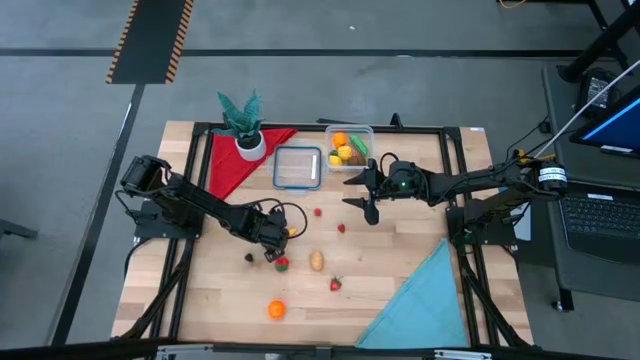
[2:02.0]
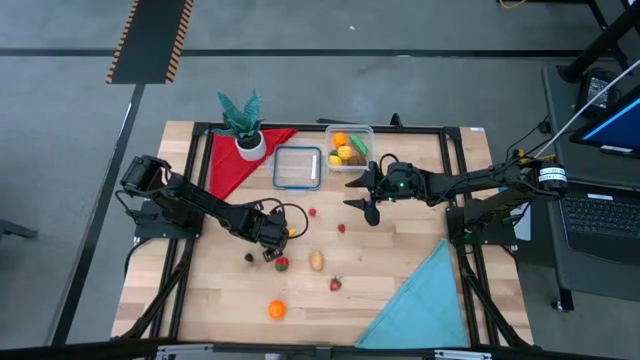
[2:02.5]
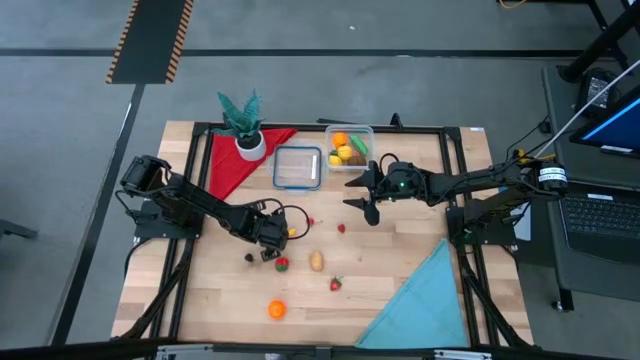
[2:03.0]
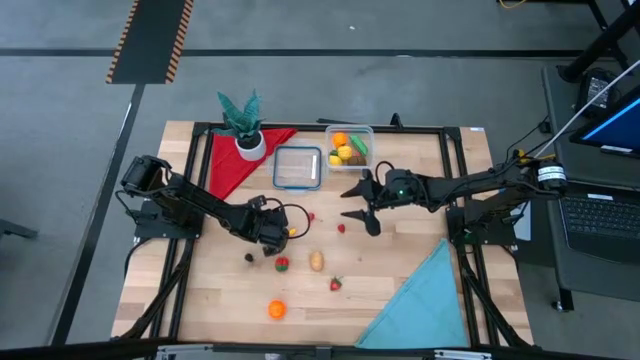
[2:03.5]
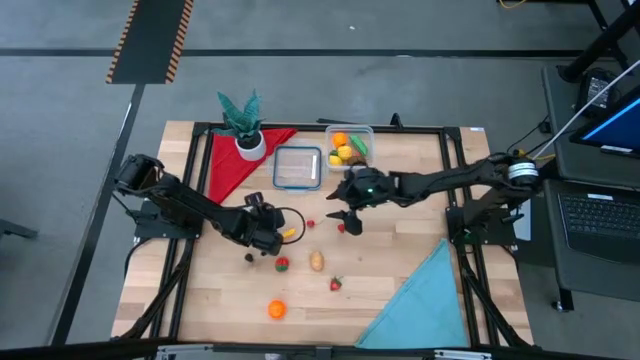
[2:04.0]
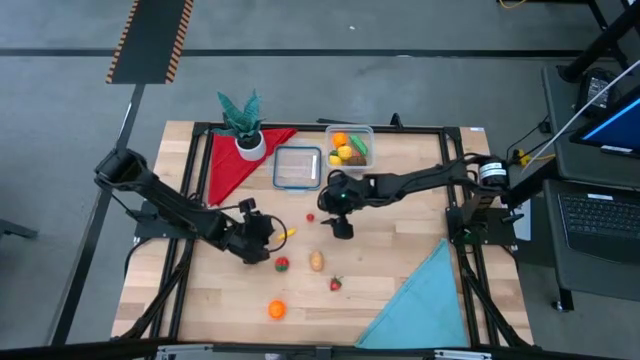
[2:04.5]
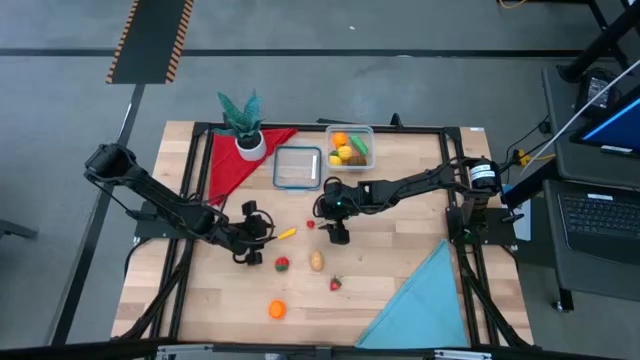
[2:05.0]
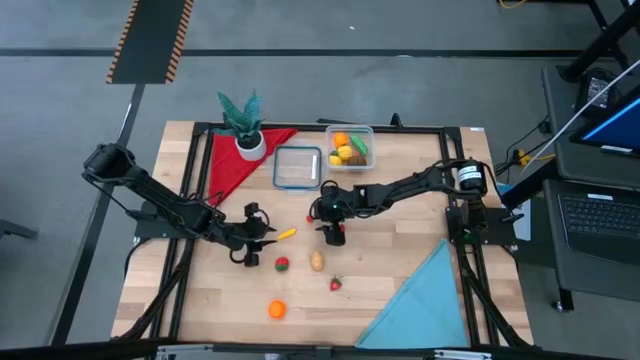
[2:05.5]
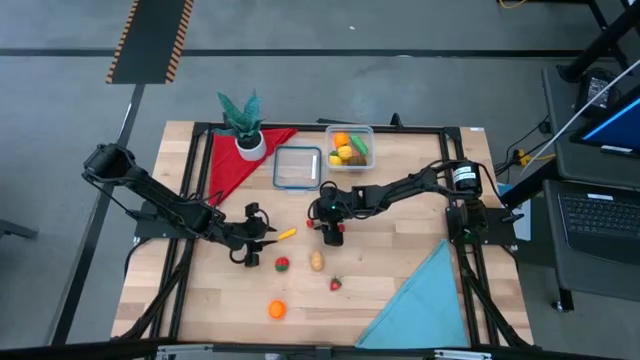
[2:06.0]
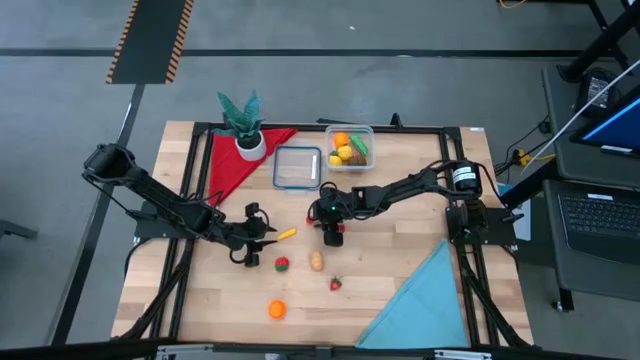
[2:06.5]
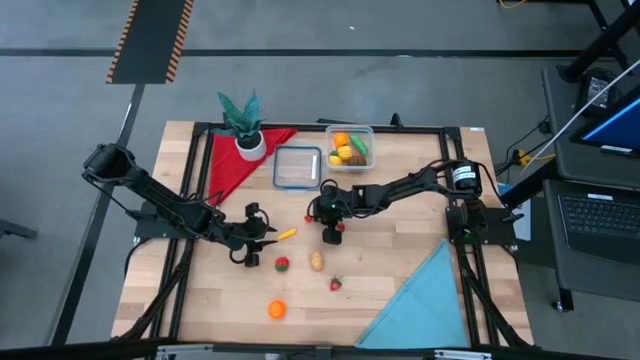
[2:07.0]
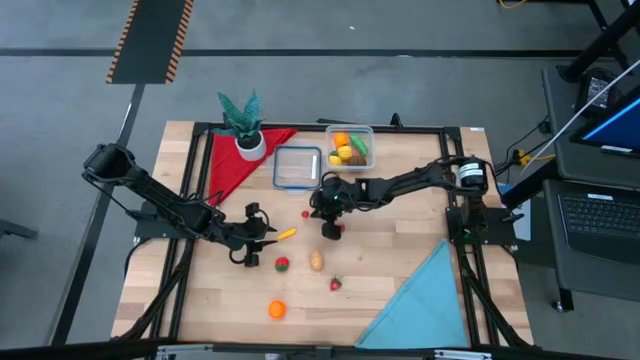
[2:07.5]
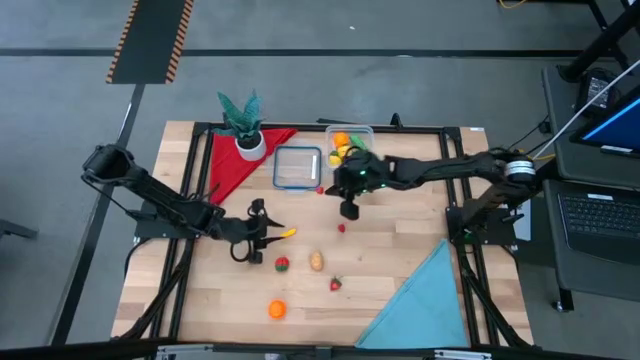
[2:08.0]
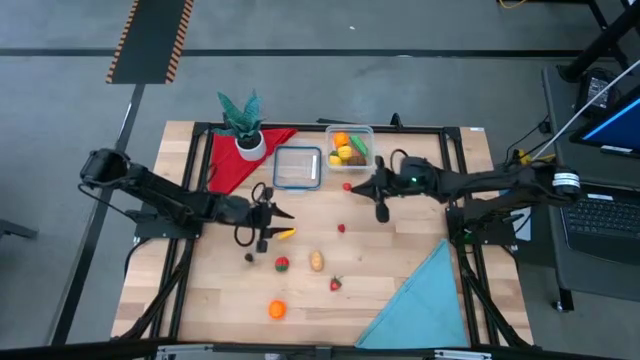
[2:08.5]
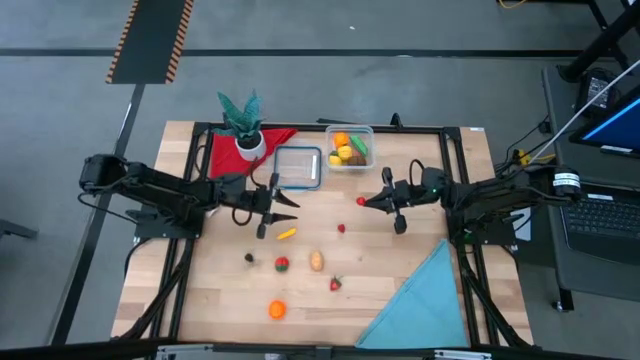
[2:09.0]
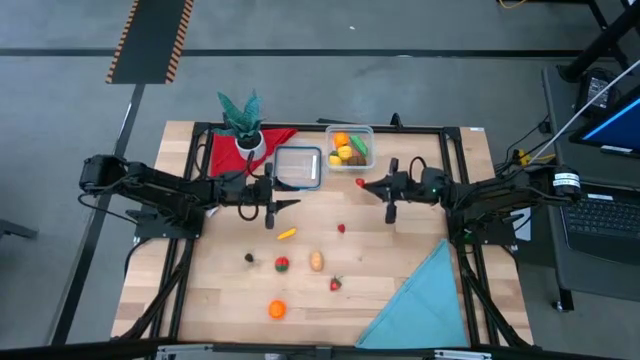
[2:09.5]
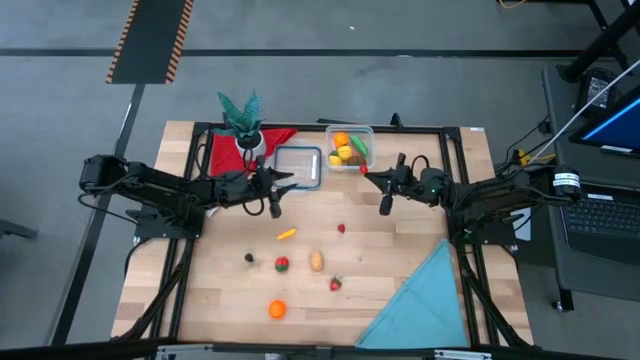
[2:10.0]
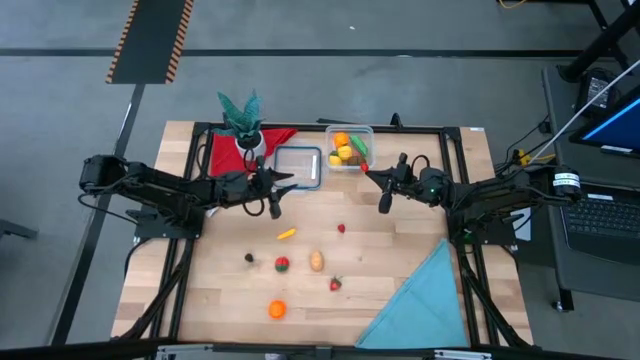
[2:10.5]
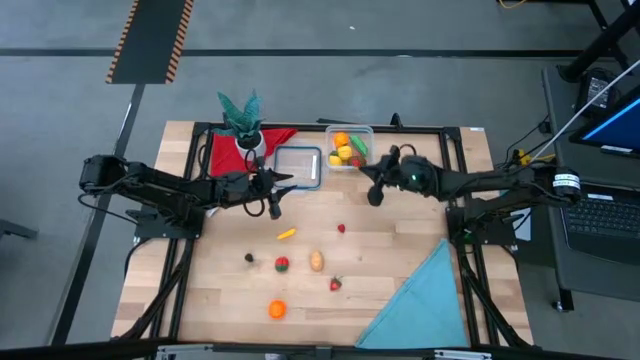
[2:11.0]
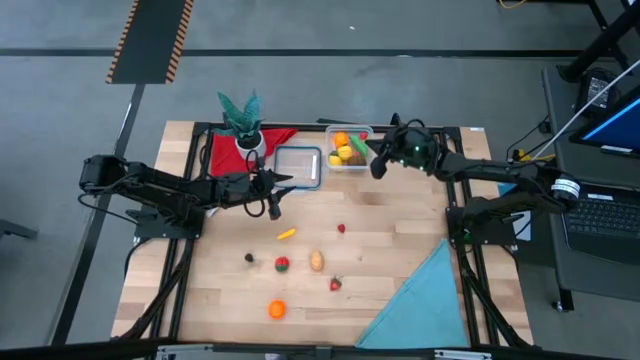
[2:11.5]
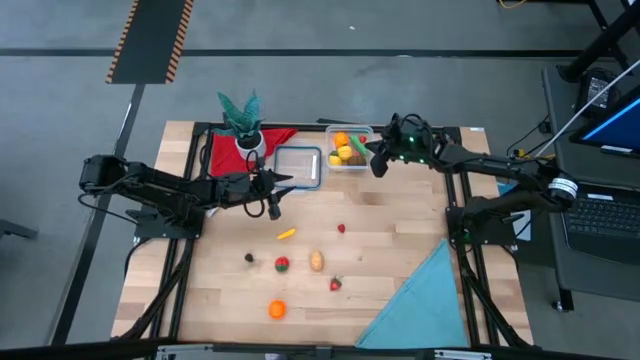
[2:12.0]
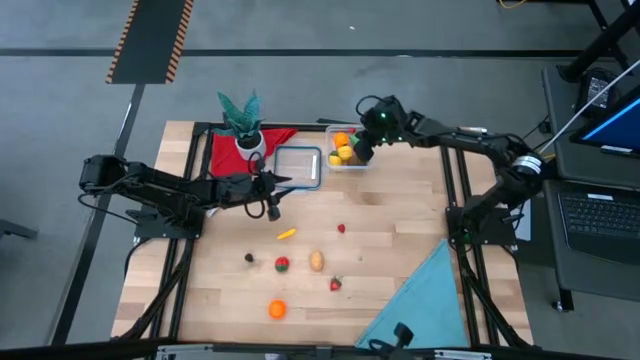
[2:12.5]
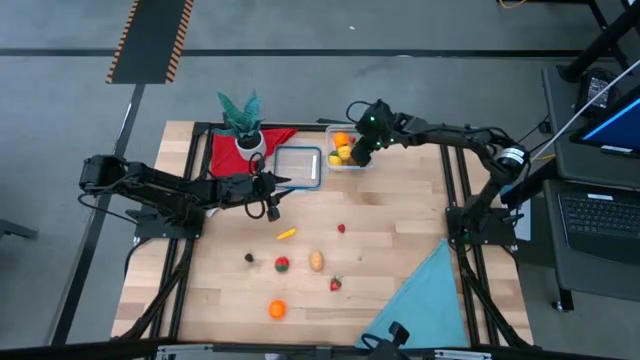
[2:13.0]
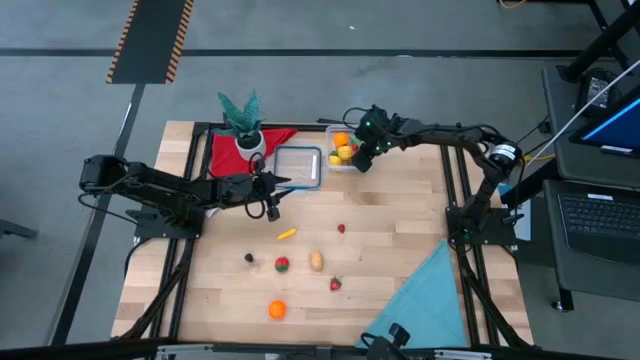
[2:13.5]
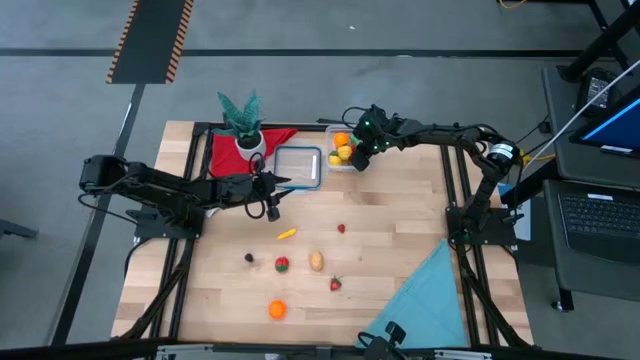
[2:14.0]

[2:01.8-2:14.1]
Task: Pick and placing Produce into tupperware
Put the cherry into the transparent bin

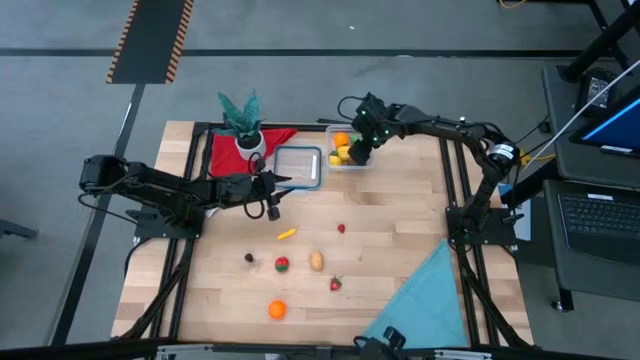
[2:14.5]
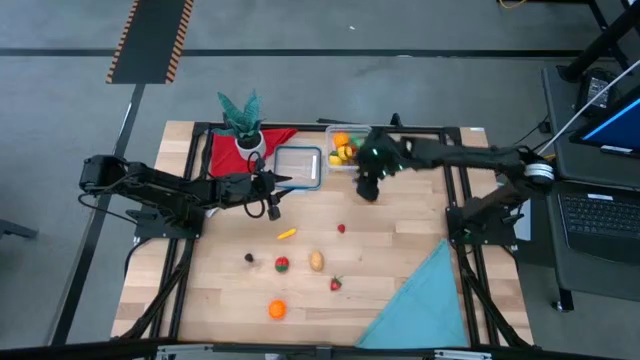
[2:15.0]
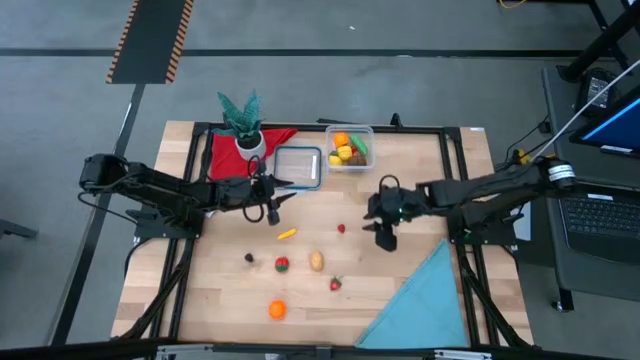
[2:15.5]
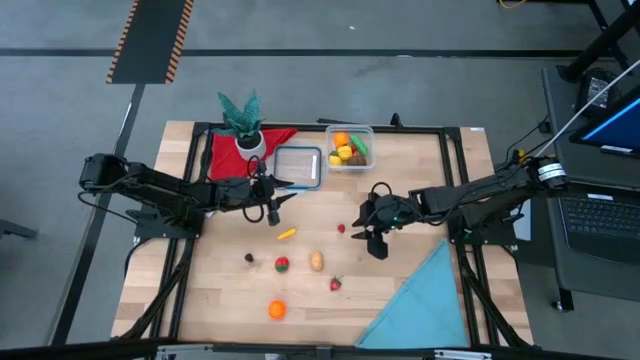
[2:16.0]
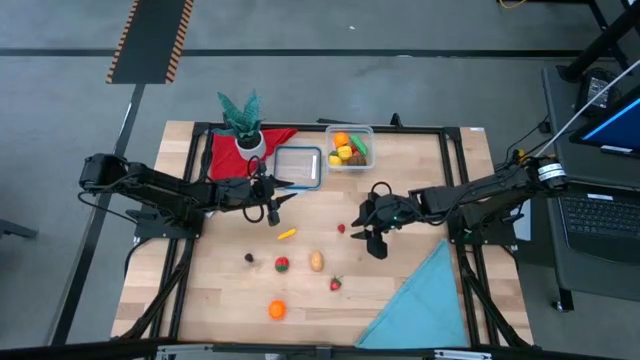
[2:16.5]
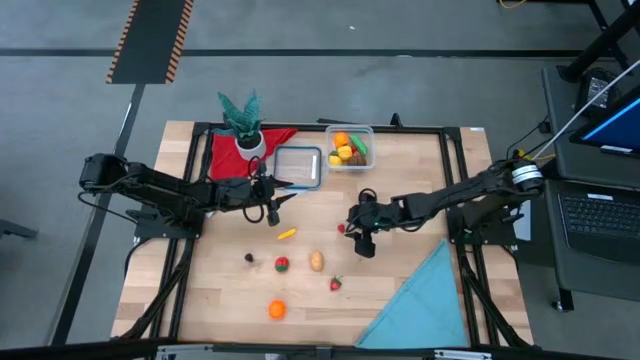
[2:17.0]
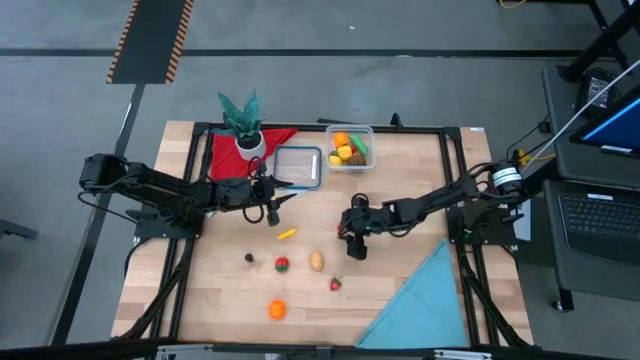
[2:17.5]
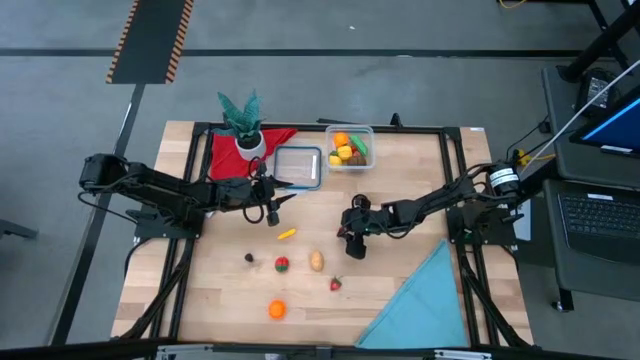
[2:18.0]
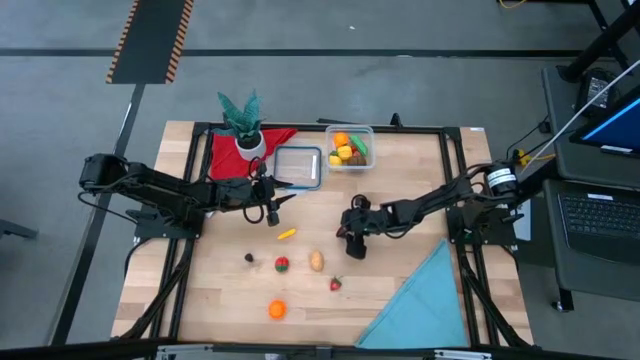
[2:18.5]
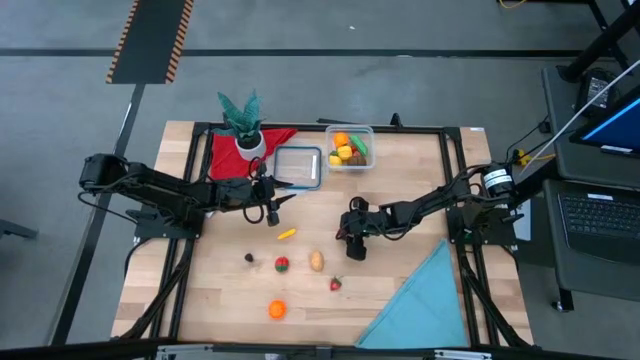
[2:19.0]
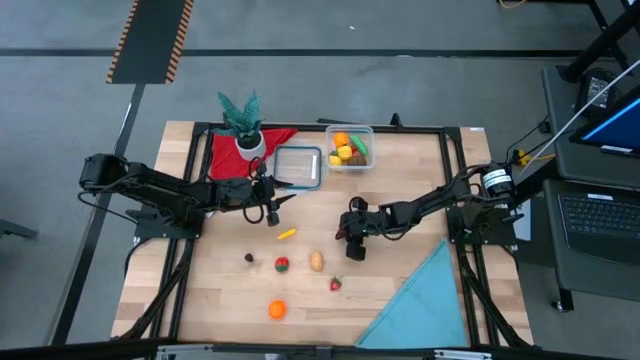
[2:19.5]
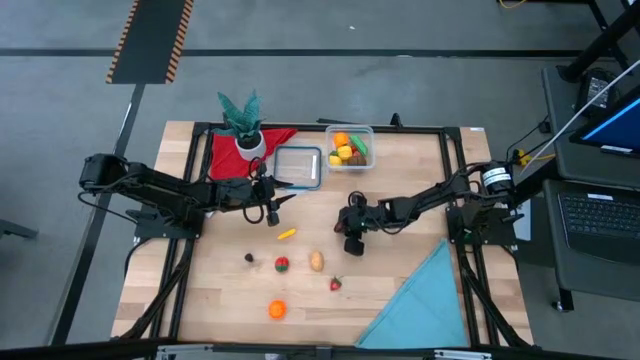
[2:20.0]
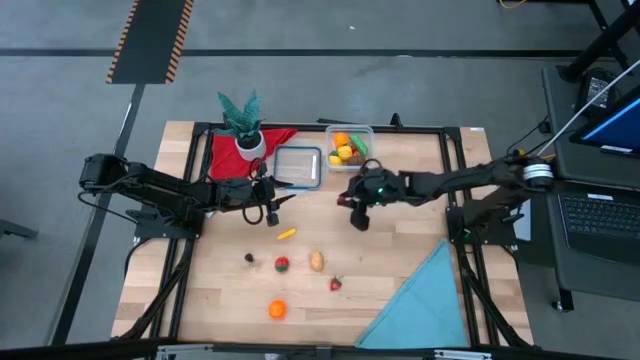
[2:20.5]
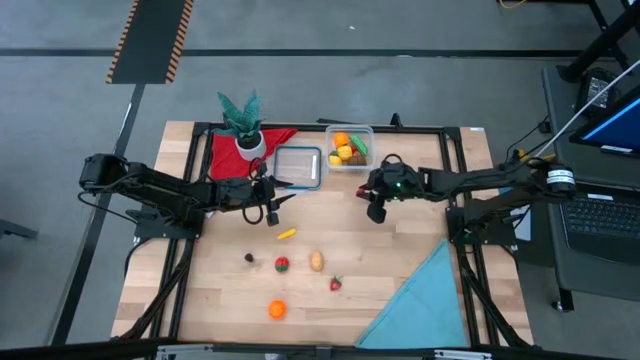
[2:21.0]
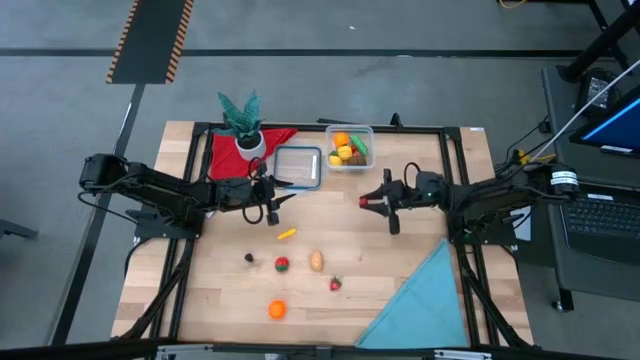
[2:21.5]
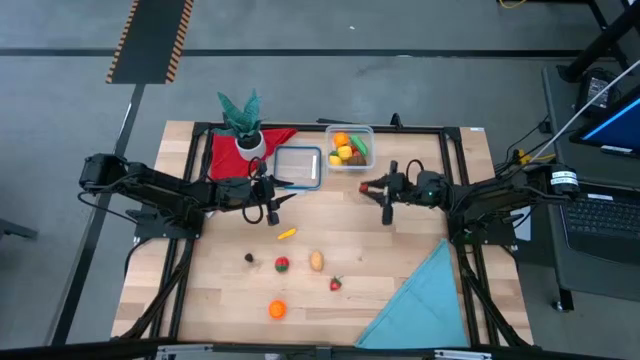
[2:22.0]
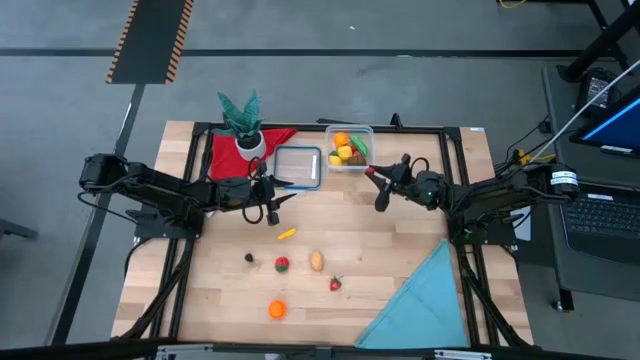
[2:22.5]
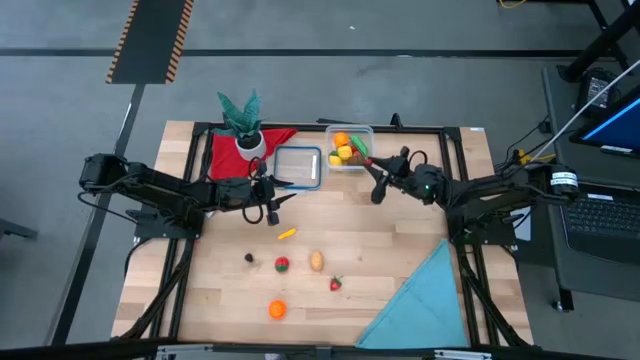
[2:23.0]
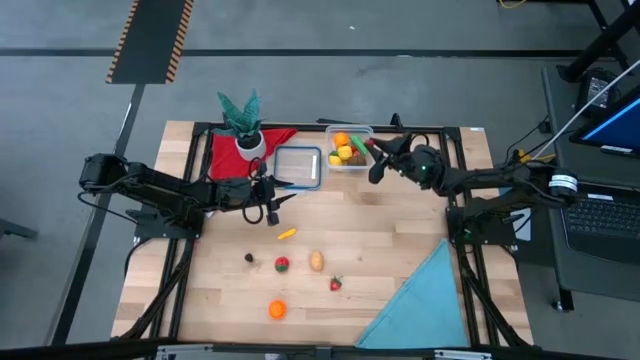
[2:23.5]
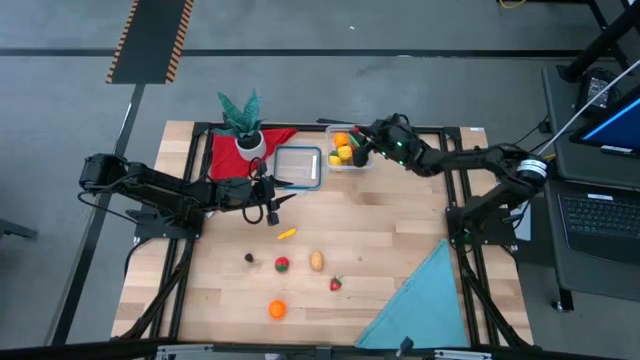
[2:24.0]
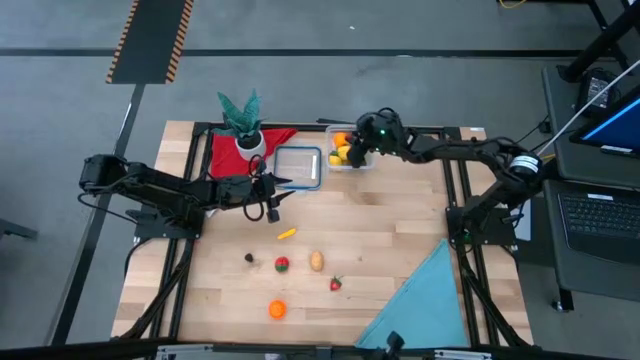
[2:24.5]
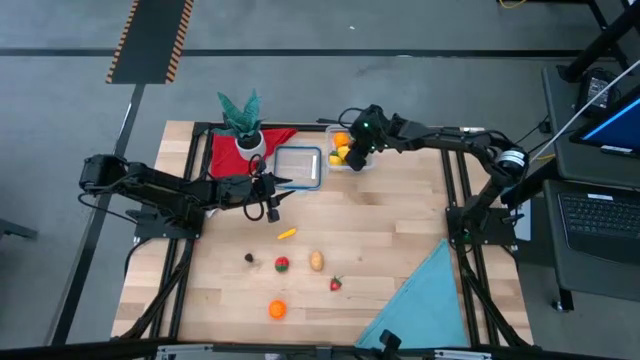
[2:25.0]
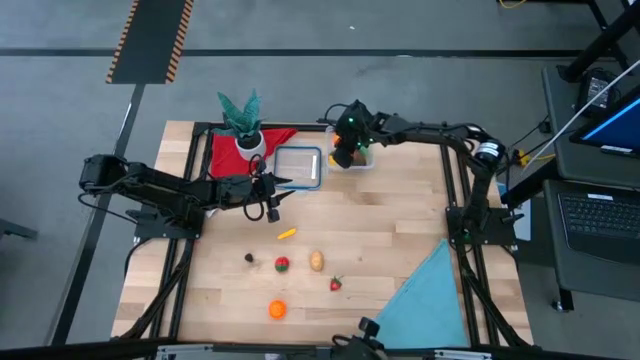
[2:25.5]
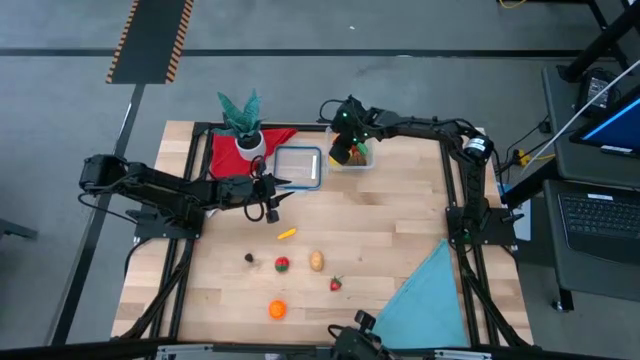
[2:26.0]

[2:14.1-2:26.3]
Put the raspberry into the transparent bin
